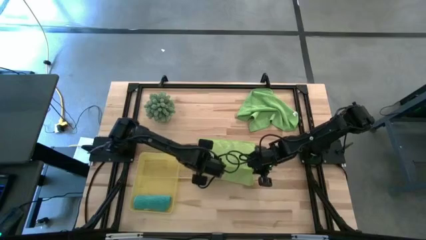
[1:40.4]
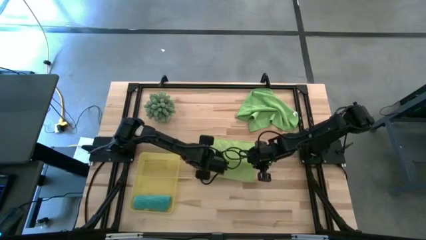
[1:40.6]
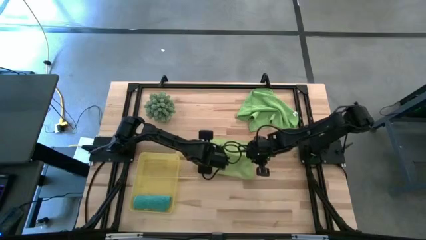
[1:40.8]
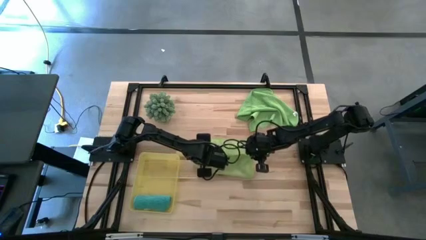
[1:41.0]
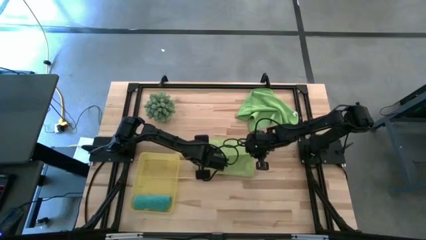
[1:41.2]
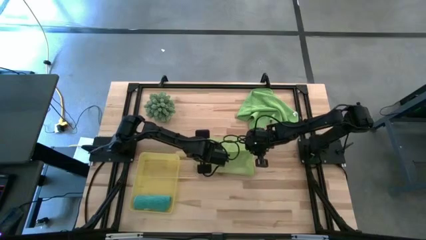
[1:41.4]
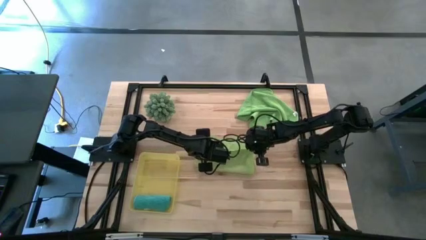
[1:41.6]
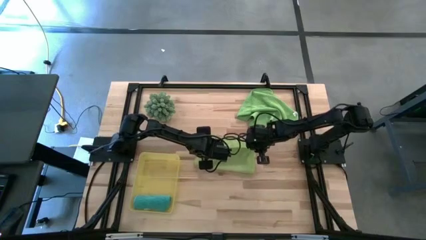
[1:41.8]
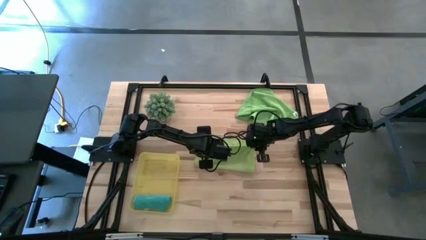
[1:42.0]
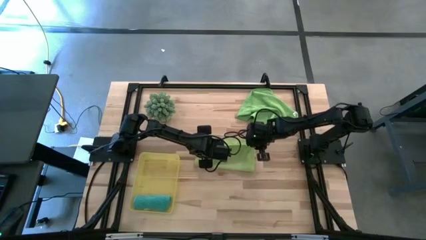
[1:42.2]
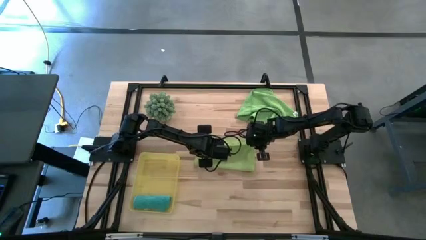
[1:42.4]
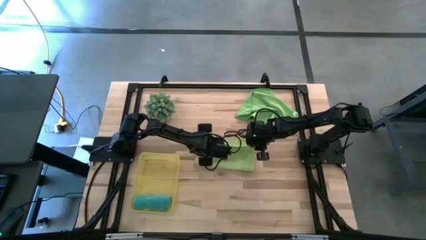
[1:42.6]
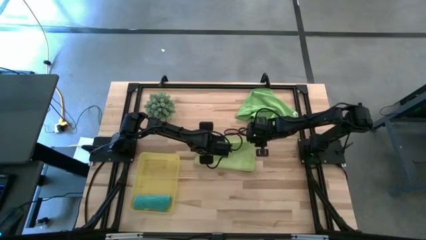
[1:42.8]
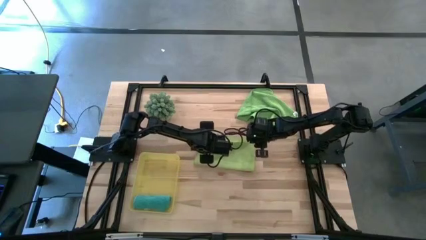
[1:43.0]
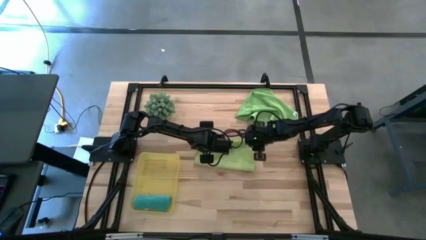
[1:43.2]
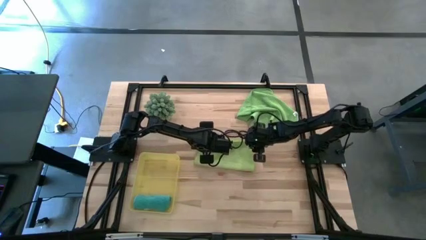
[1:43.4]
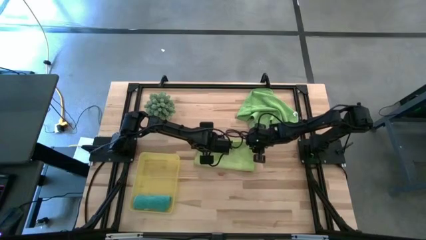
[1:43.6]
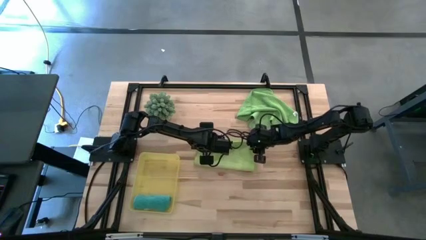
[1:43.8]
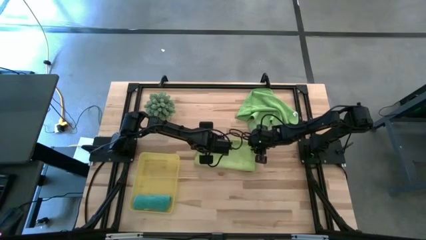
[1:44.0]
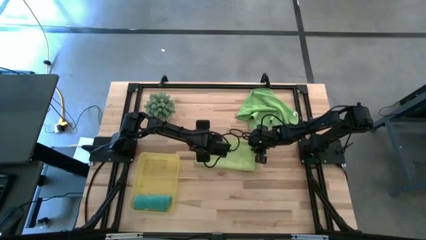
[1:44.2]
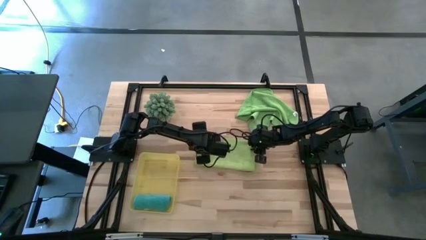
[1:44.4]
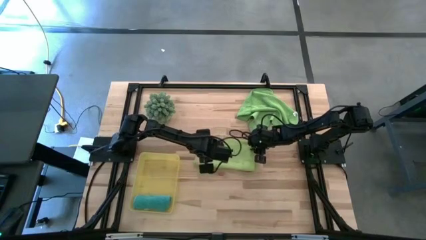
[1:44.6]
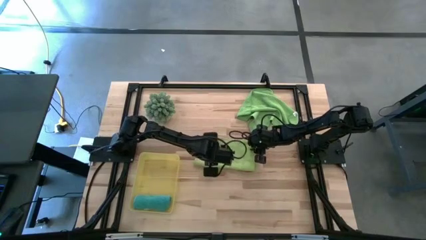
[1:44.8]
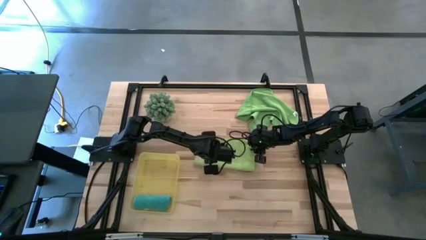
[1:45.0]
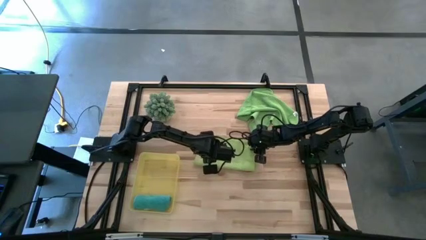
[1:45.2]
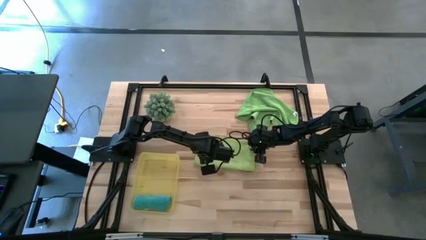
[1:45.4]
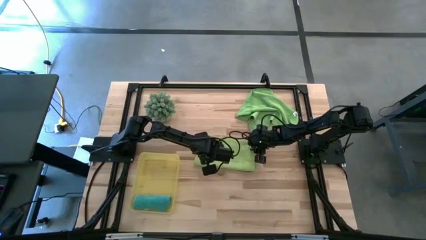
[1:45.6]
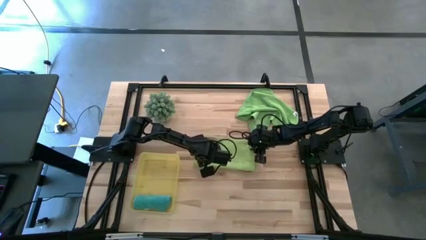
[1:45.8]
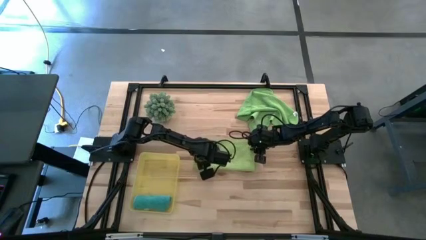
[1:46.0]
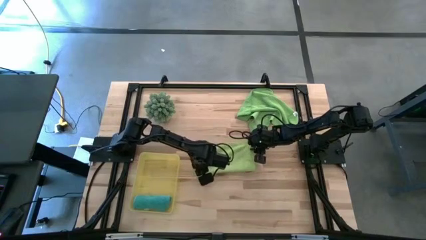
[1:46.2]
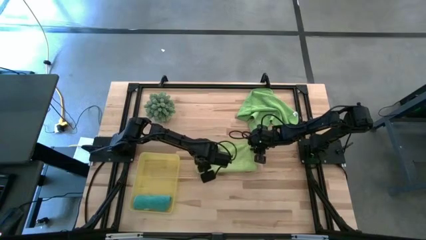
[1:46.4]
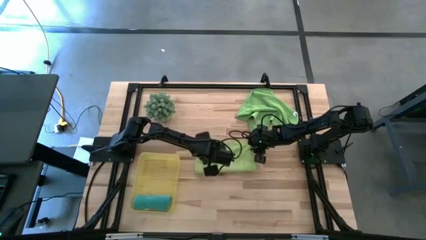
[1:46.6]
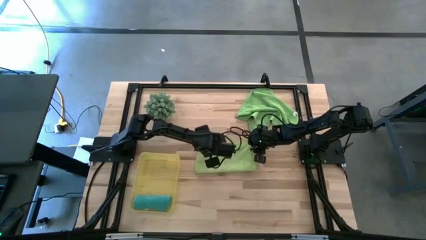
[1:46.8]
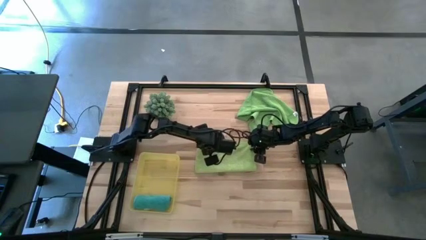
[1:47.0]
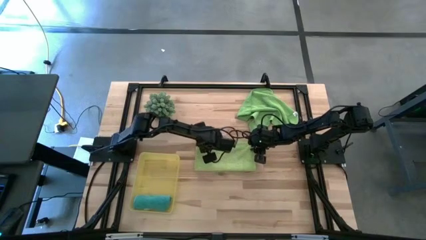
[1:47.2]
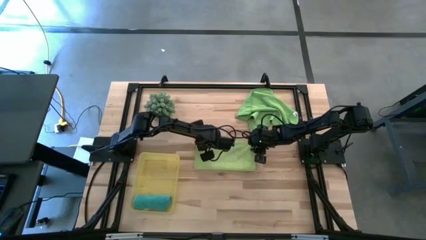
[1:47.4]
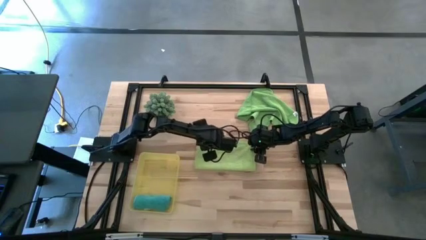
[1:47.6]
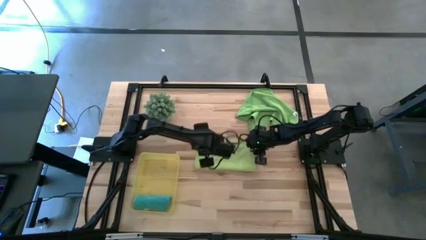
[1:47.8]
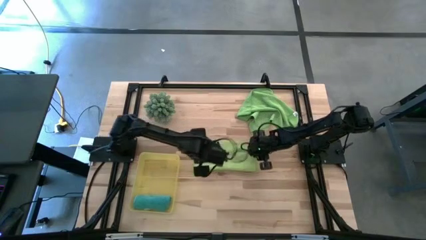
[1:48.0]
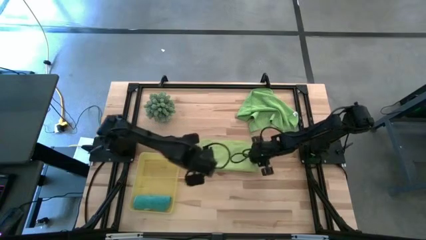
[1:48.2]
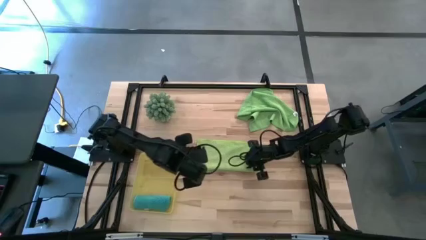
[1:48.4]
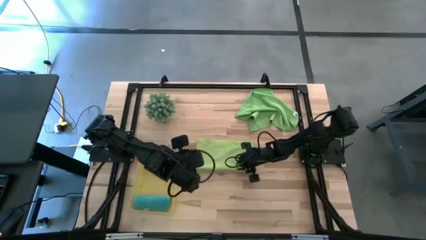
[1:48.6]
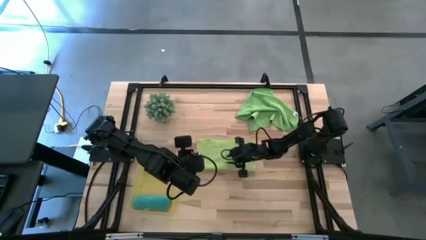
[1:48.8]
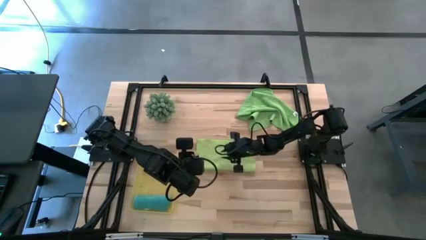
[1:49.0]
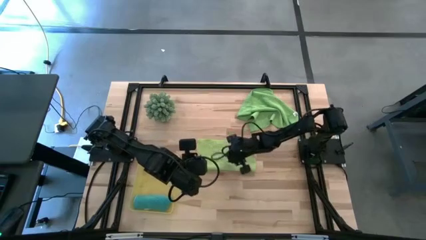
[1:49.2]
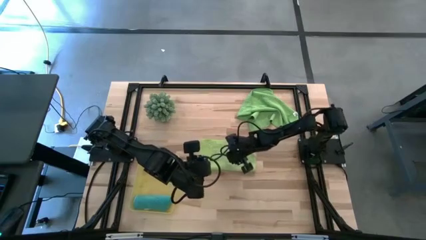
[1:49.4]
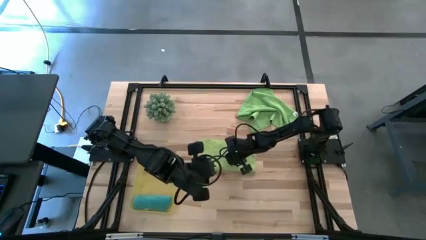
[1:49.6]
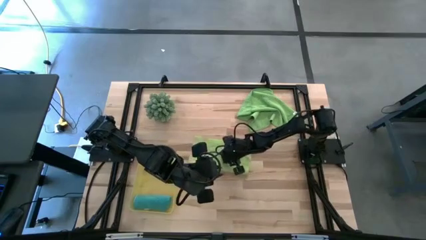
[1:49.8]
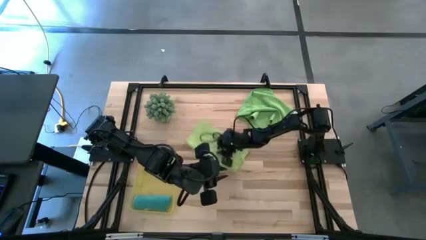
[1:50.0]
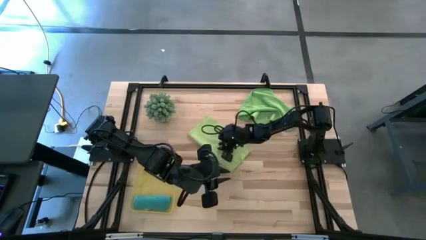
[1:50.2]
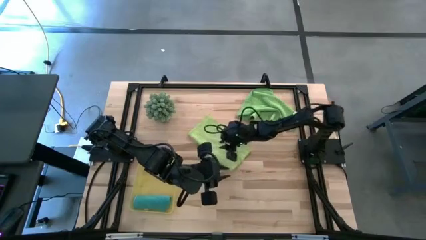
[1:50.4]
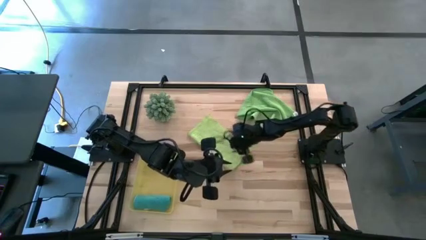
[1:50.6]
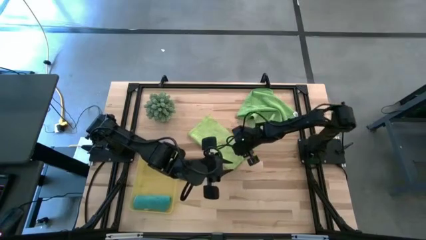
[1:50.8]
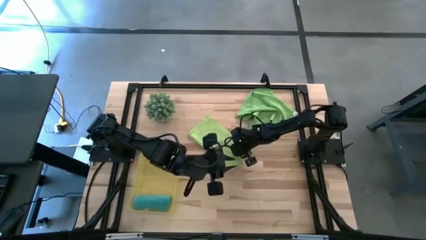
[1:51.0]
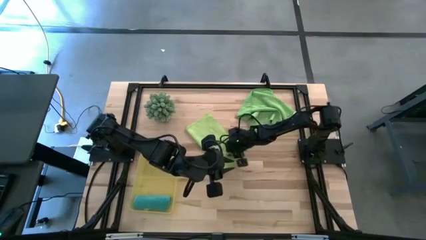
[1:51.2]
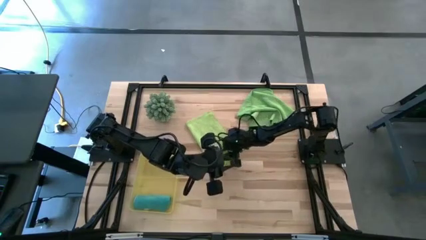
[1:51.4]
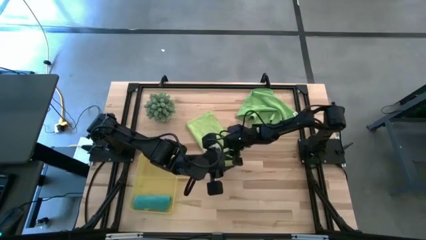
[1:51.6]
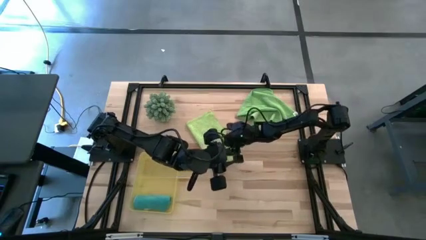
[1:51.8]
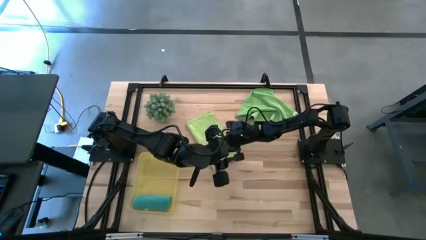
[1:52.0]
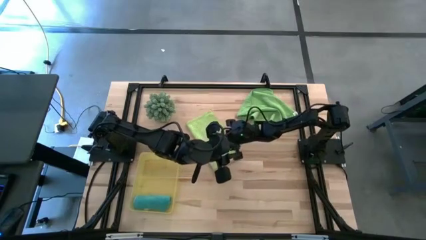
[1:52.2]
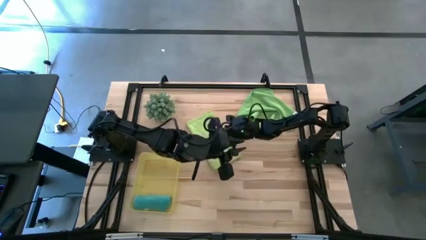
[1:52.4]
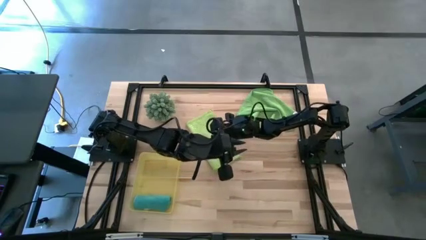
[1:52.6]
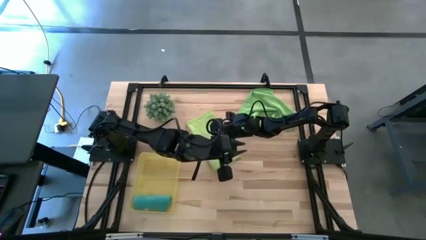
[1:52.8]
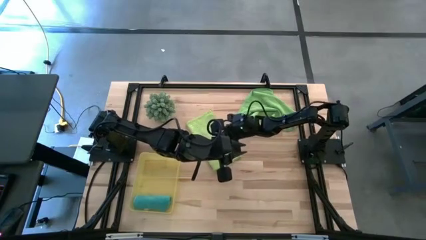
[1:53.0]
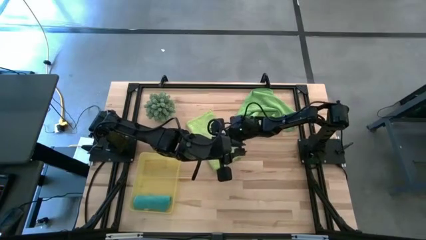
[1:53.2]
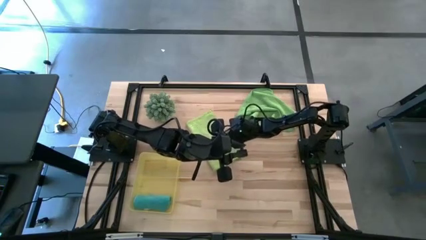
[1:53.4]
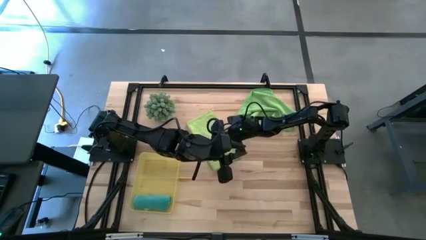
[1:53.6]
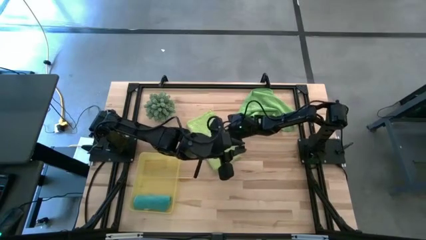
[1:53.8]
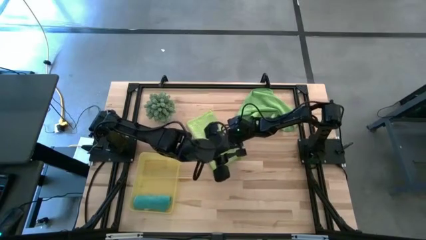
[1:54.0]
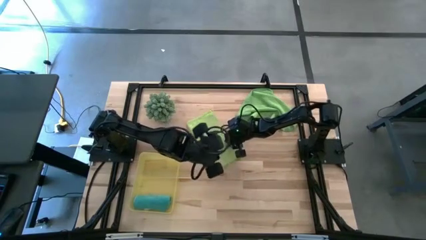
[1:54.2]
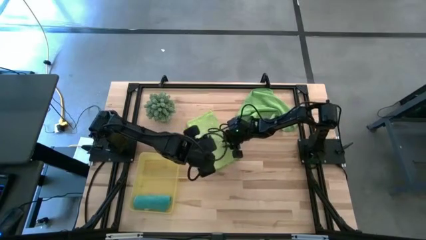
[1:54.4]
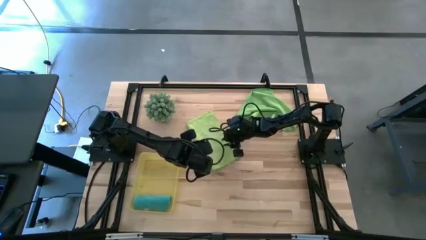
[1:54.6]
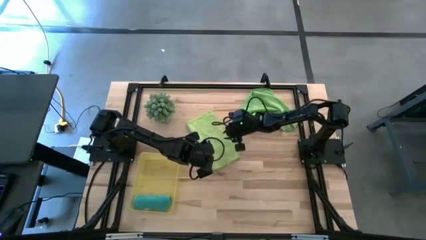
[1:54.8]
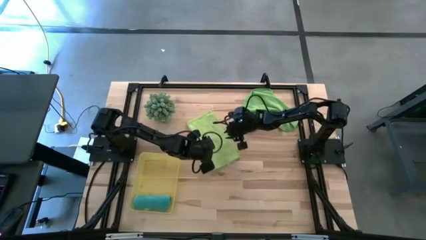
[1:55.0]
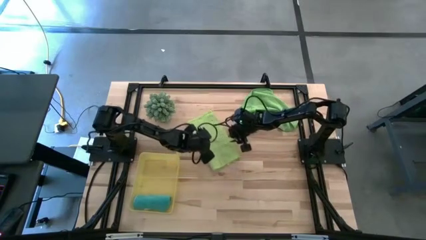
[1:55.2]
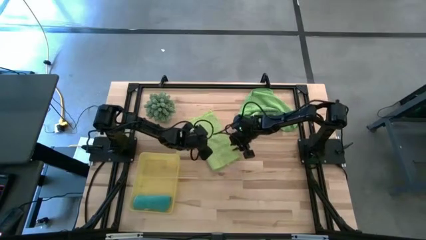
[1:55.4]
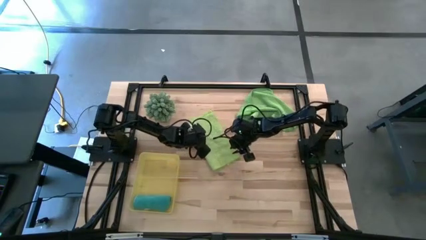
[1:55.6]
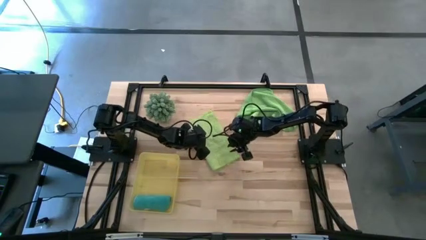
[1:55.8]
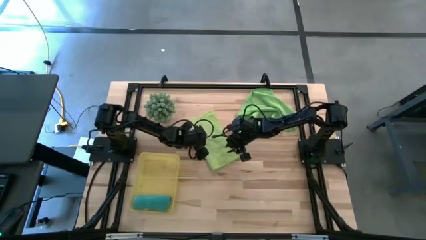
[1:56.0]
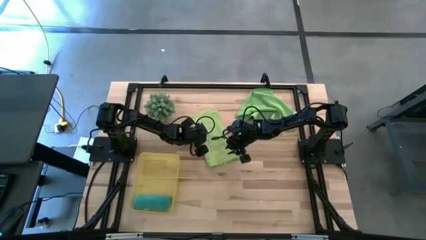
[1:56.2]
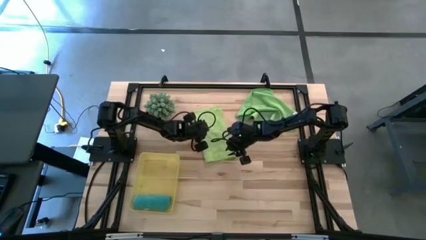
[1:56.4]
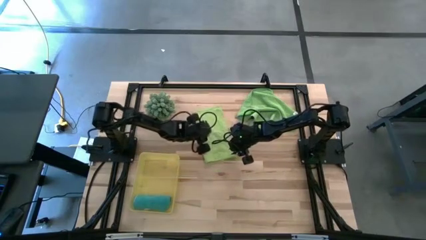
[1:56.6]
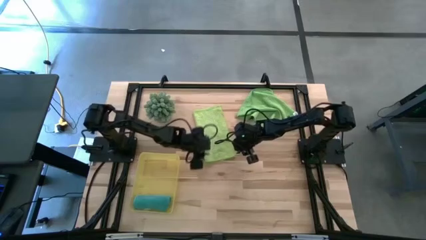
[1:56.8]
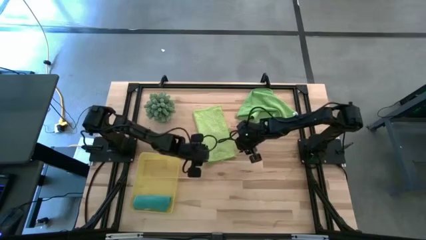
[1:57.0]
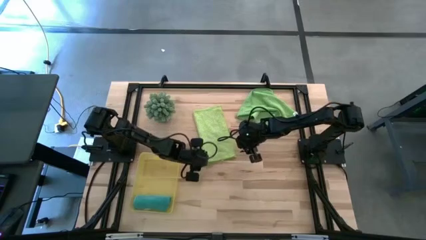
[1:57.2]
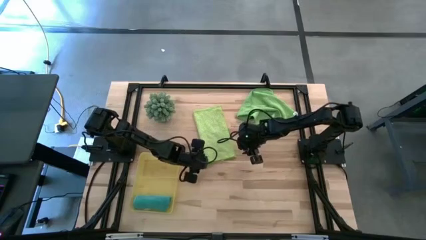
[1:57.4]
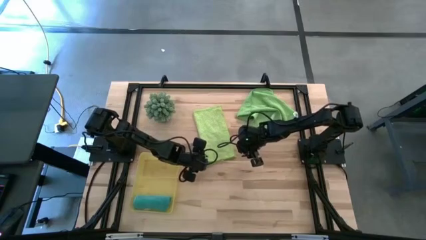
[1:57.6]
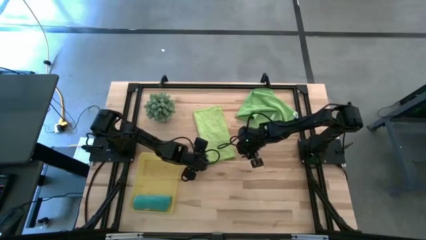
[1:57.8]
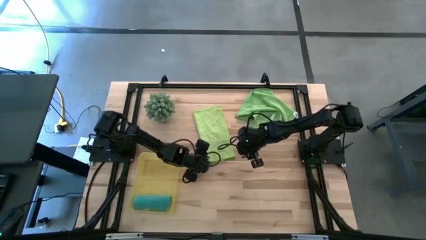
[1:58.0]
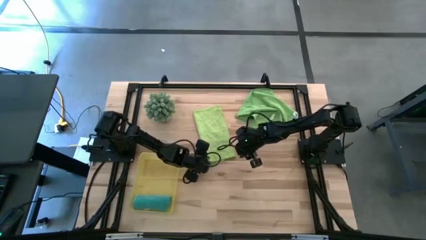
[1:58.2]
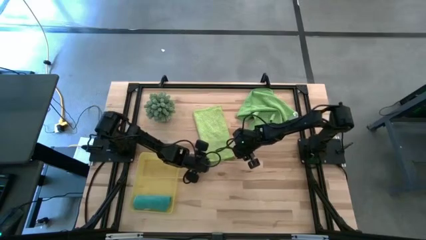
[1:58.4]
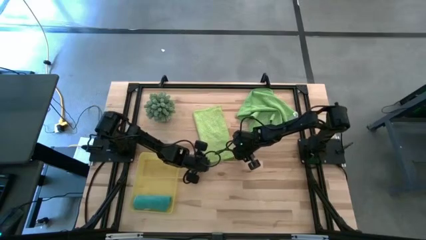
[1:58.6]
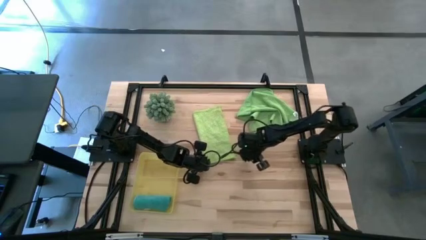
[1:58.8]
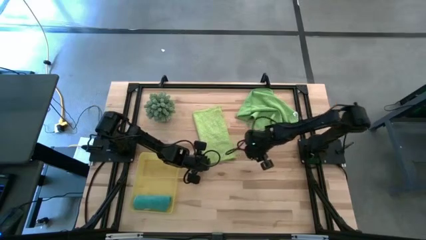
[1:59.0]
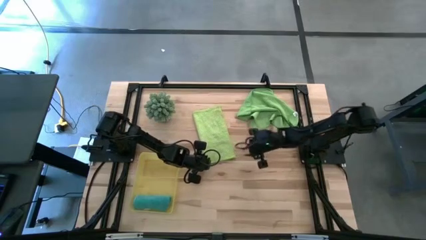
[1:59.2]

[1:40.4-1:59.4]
Task: Roll microfiber towels into tight, uniform cylinder then place into a basket
Fold the light green towel
